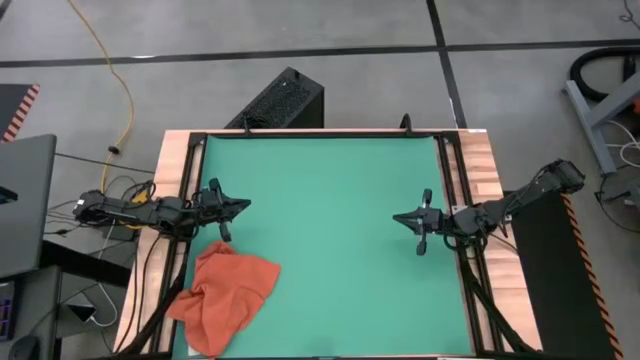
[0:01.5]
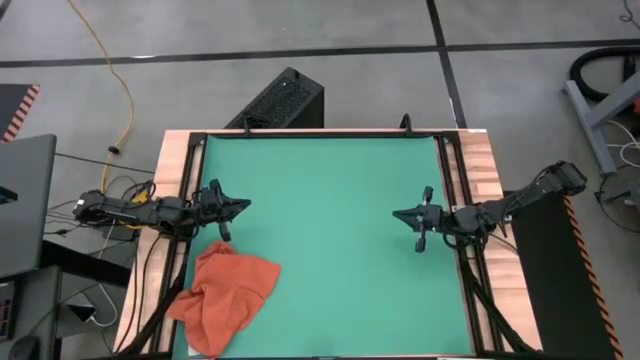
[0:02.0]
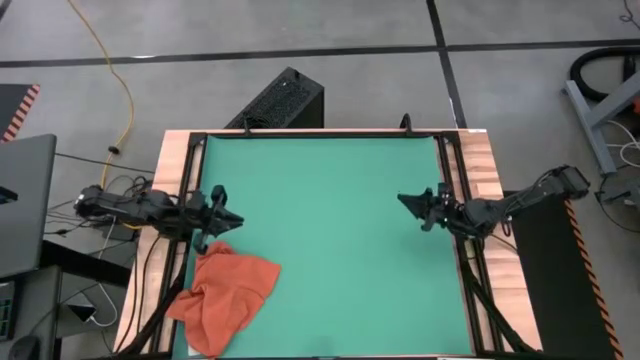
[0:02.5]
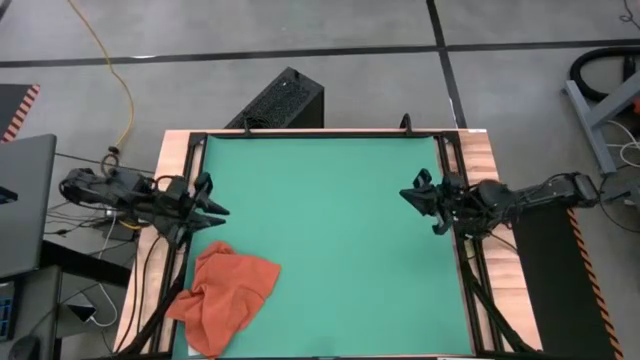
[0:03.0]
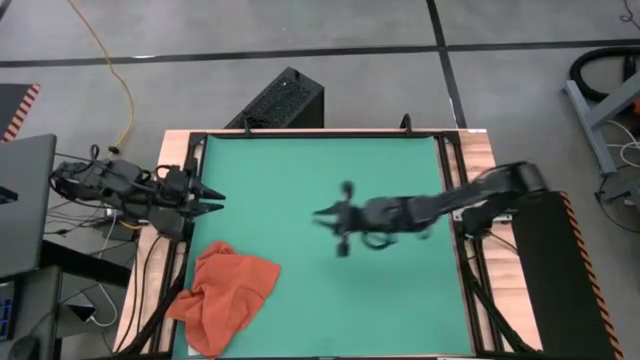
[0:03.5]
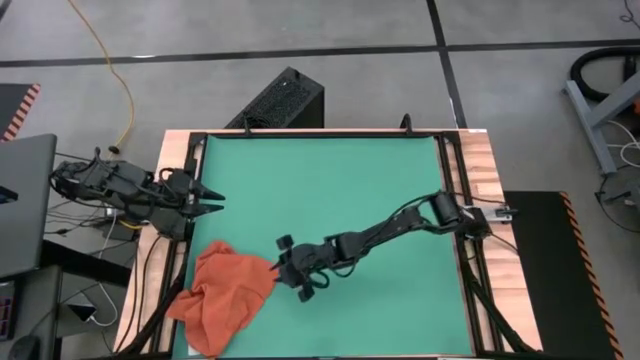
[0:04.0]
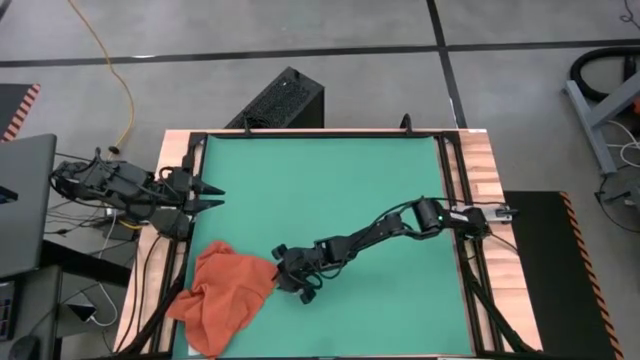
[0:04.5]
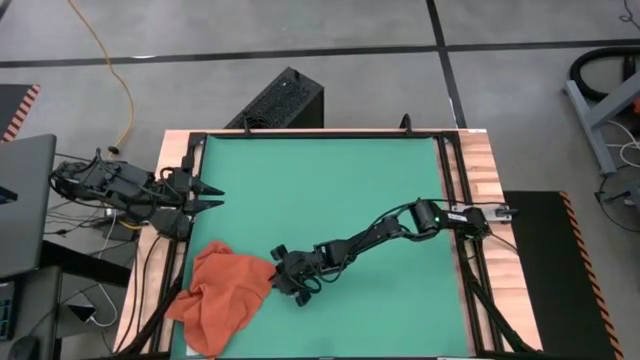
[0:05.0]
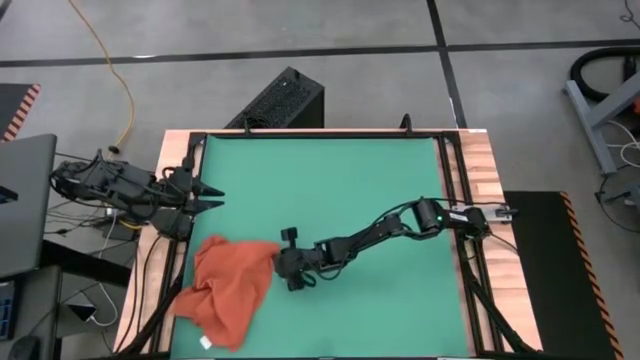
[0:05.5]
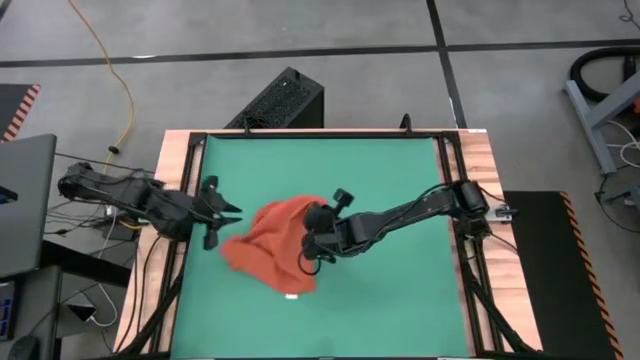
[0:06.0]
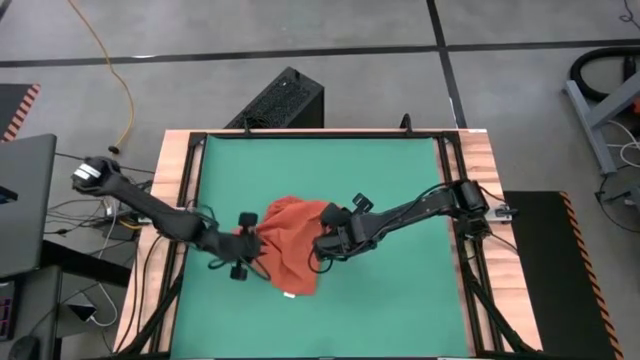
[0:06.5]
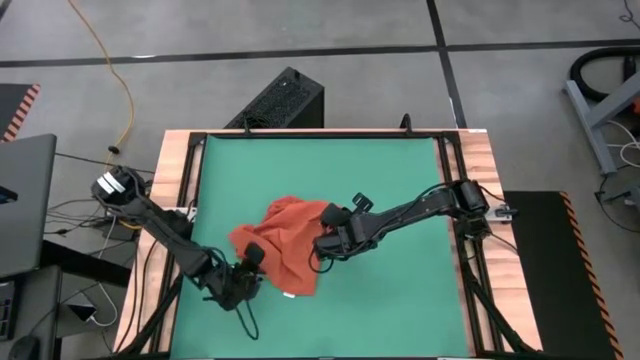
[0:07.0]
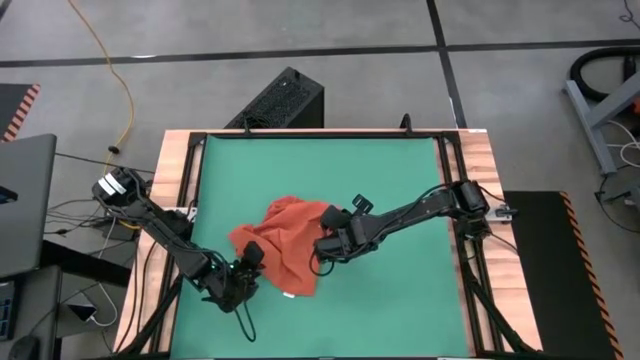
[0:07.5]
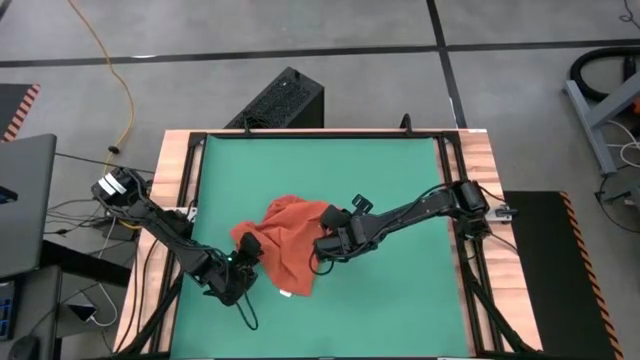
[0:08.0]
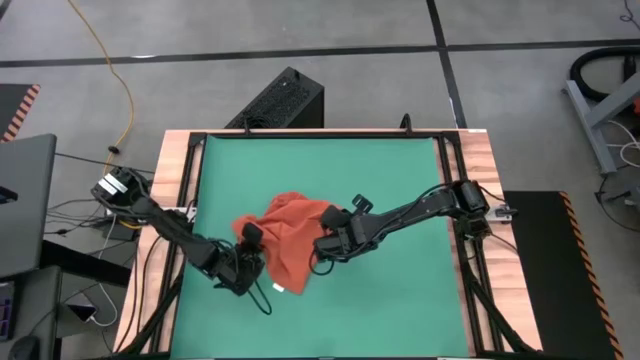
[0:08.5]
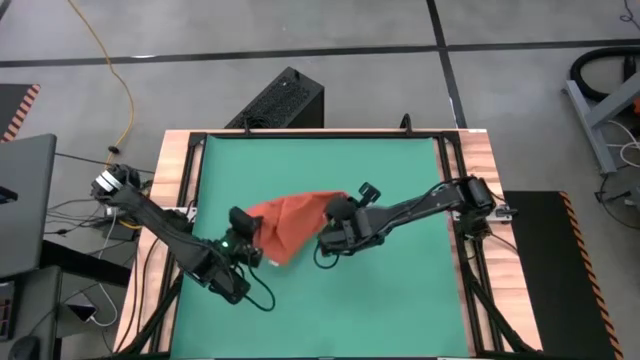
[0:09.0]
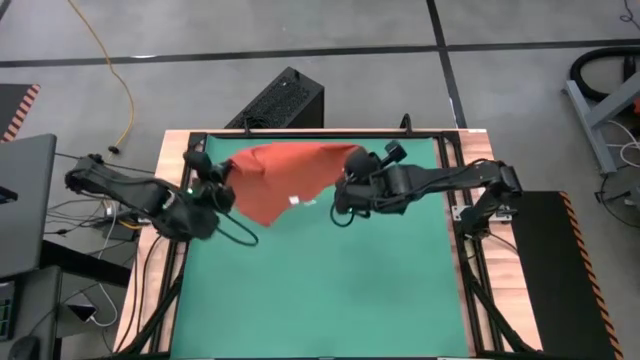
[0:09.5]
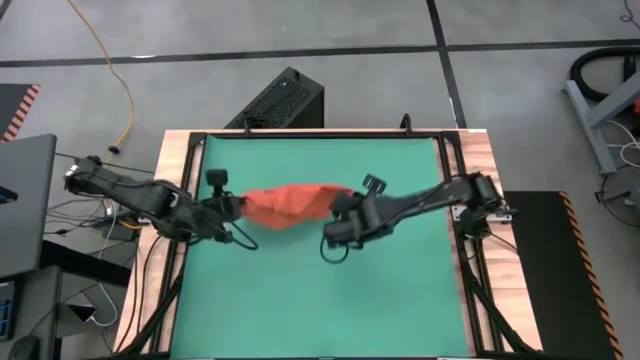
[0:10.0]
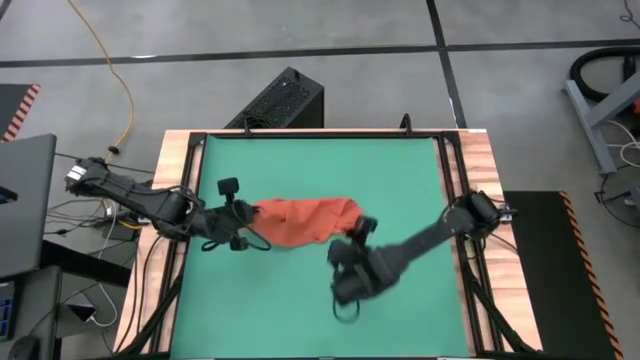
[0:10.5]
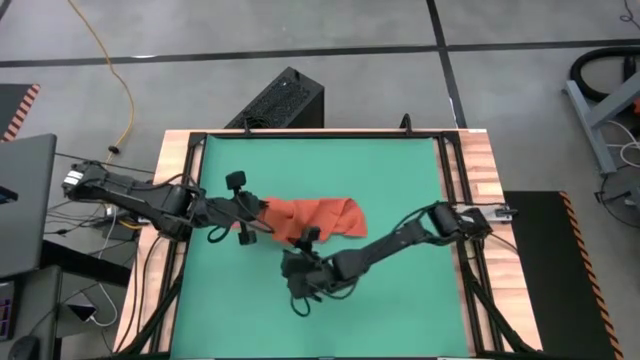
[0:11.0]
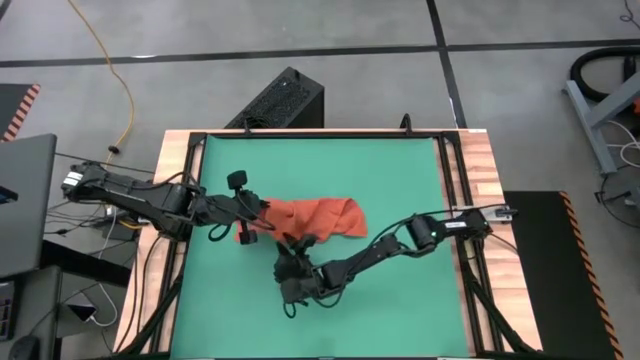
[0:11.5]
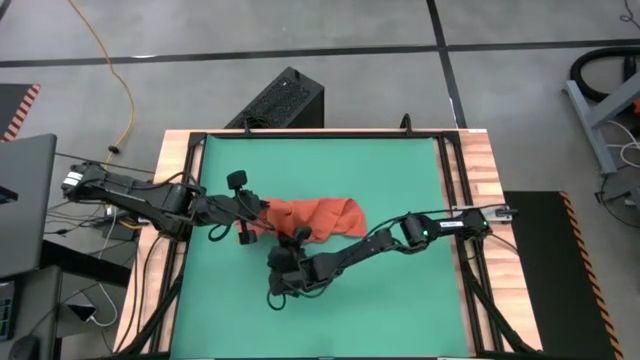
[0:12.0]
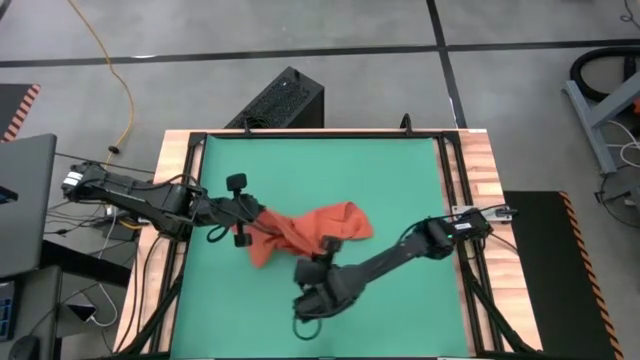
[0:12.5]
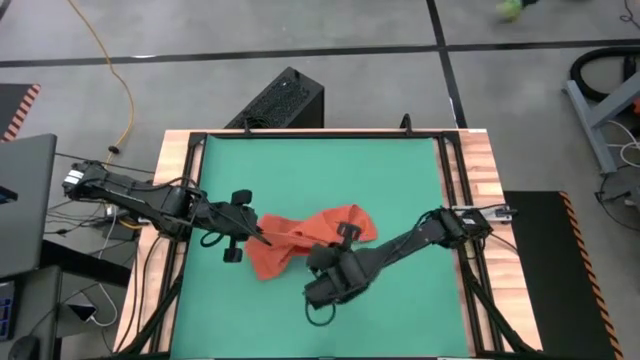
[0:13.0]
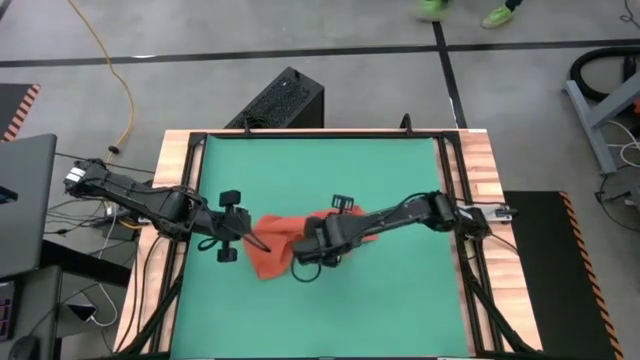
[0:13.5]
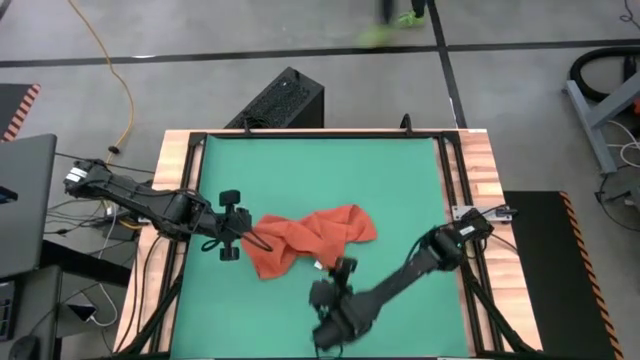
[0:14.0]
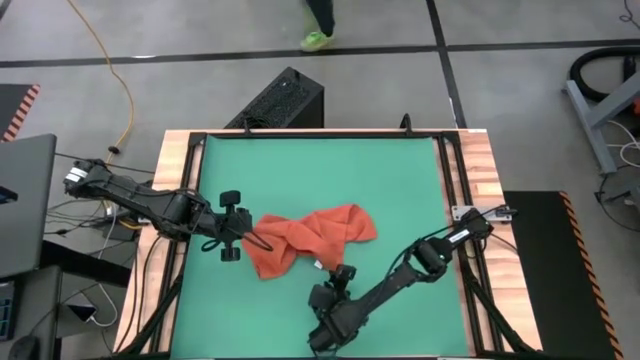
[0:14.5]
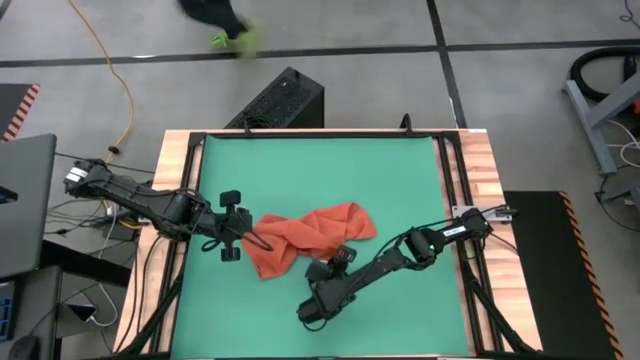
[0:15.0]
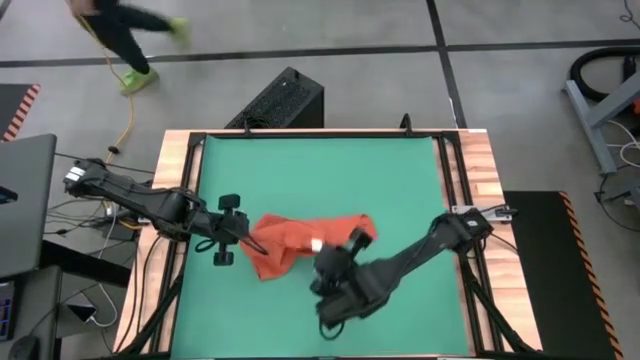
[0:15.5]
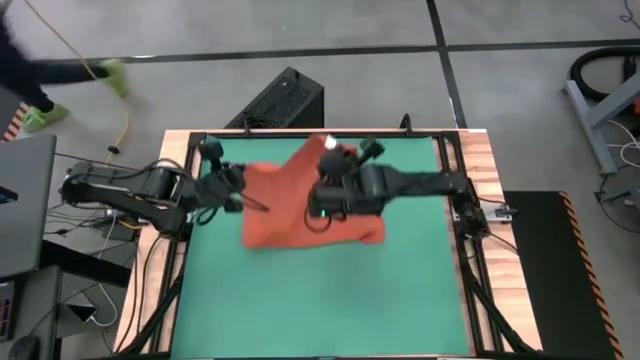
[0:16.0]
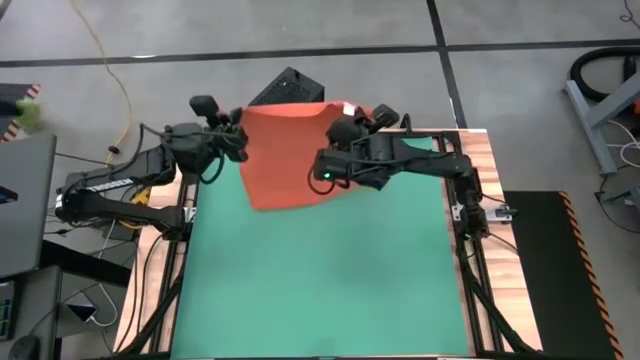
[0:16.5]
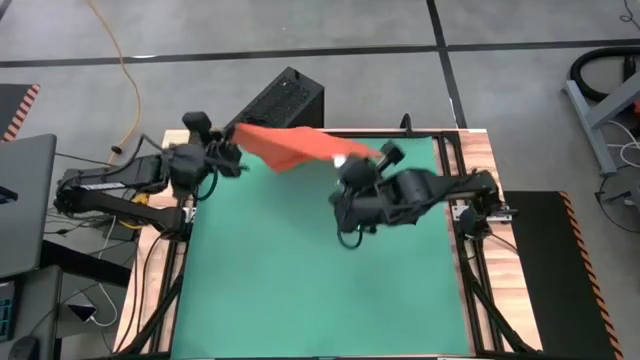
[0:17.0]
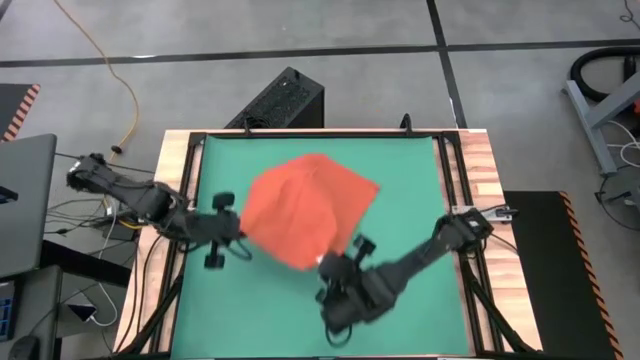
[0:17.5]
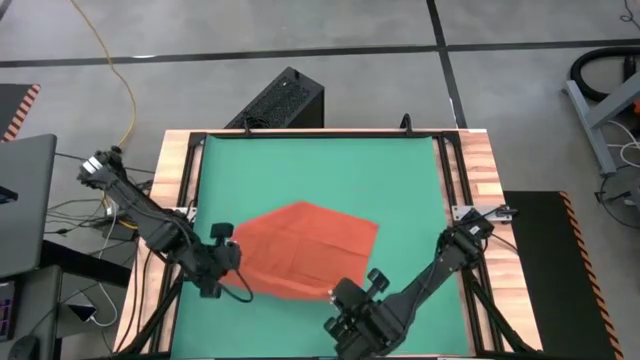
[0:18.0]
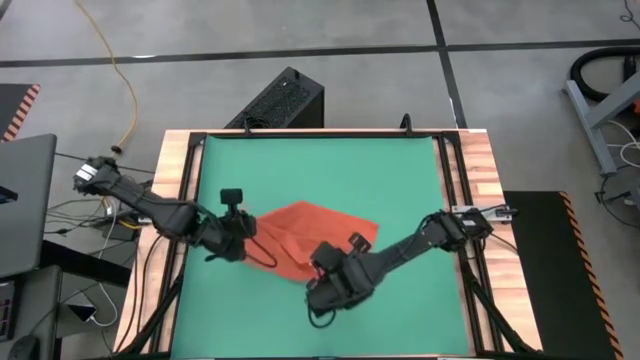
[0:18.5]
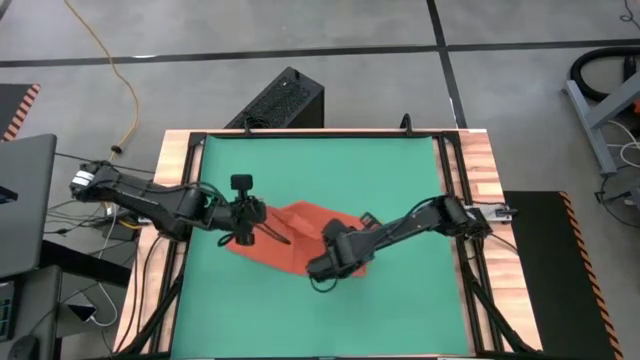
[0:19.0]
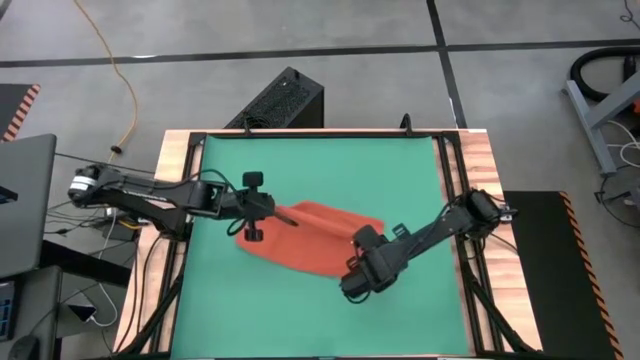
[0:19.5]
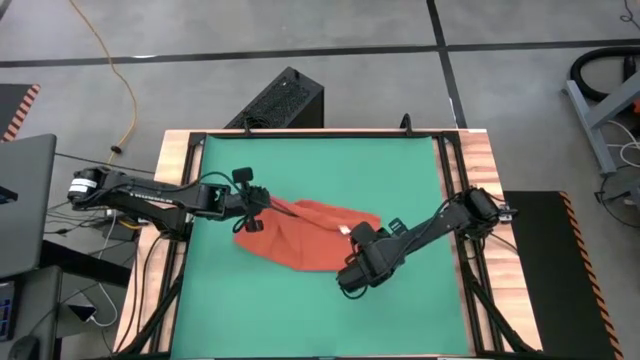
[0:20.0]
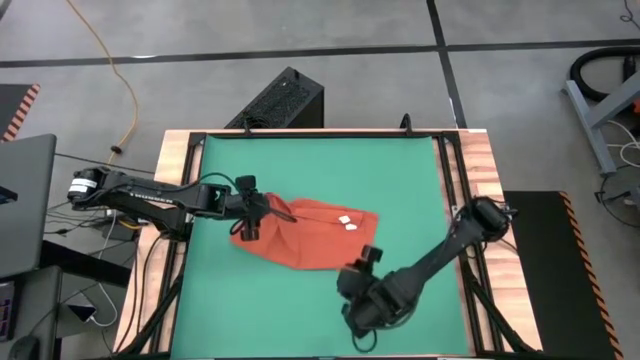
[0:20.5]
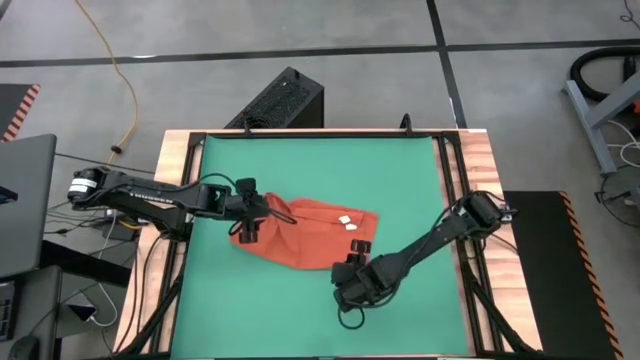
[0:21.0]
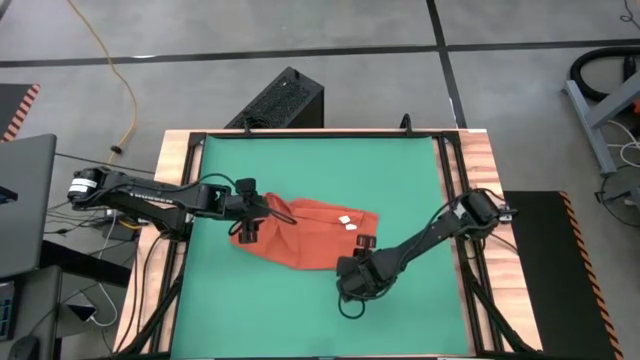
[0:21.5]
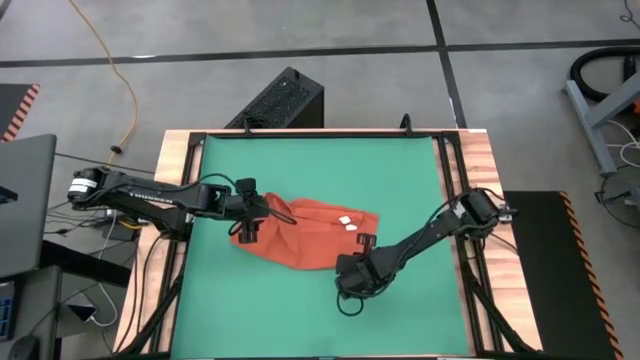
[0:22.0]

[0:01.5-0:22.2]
Task: Roll towel into tight, uniform cylinder
Roll the orange towel
